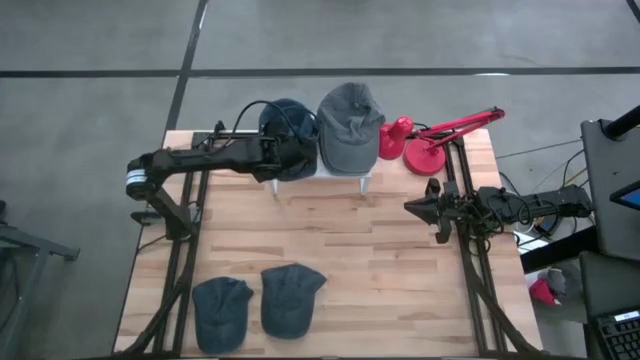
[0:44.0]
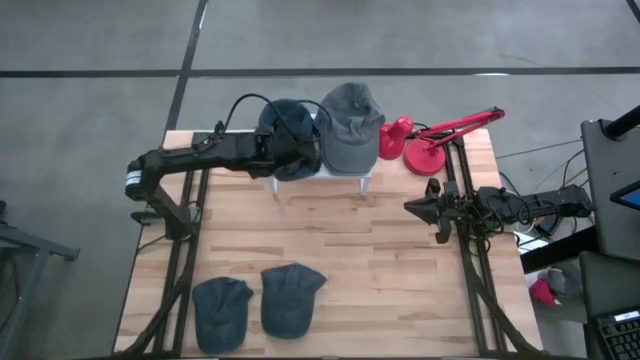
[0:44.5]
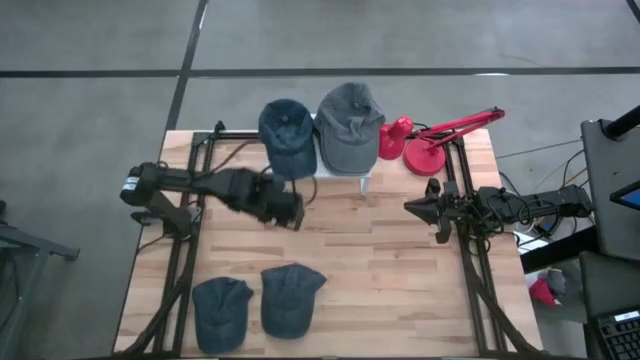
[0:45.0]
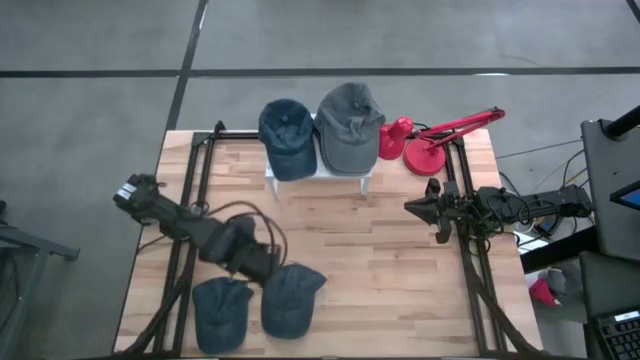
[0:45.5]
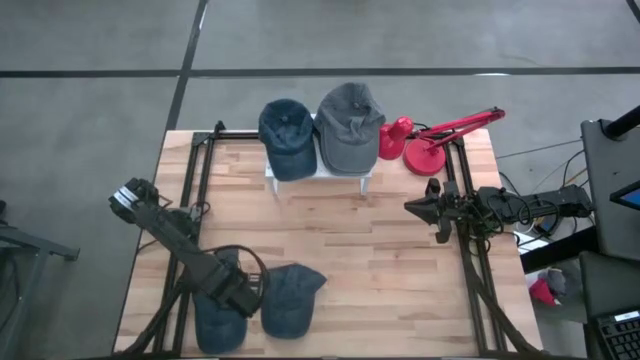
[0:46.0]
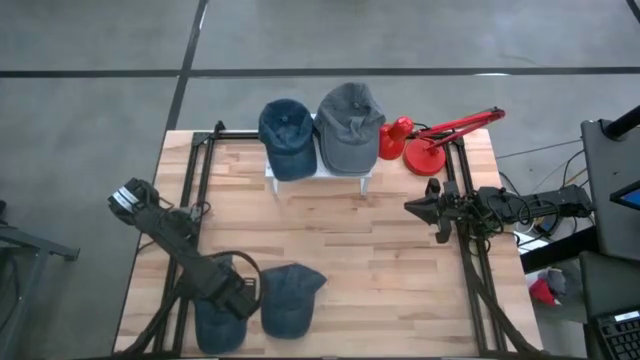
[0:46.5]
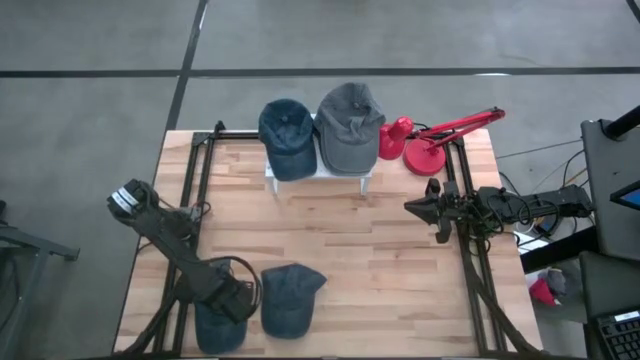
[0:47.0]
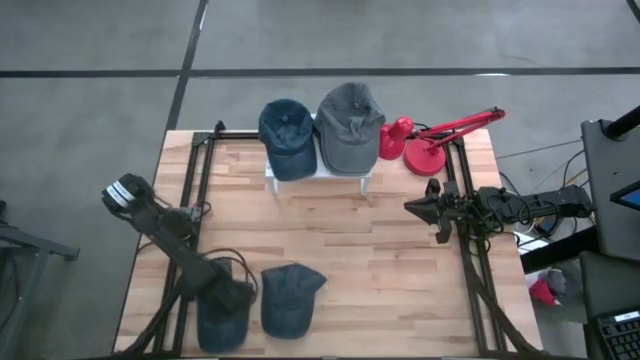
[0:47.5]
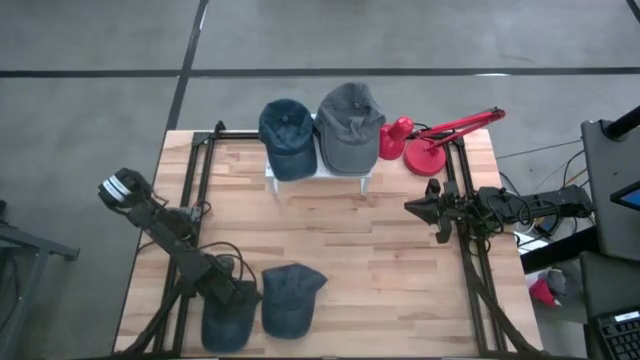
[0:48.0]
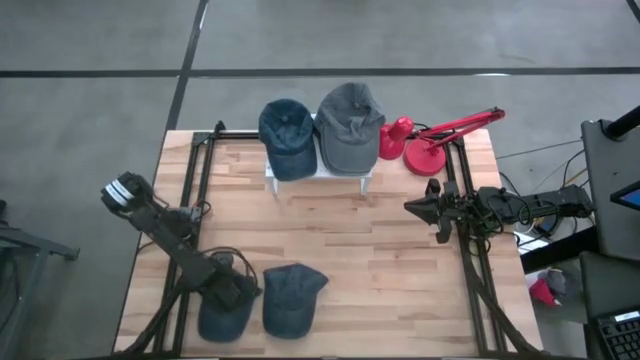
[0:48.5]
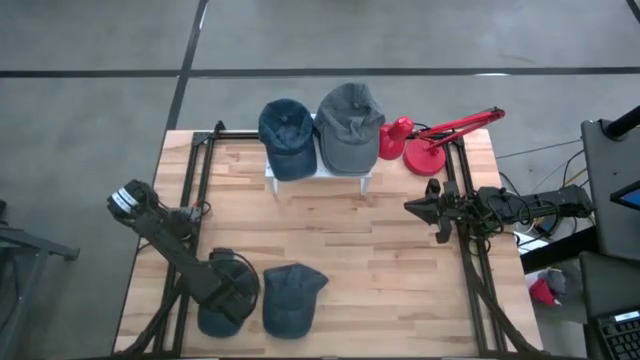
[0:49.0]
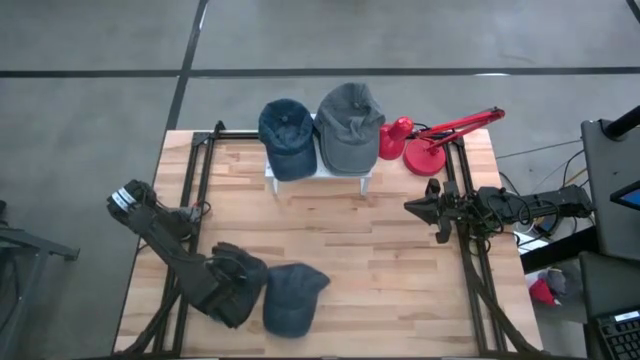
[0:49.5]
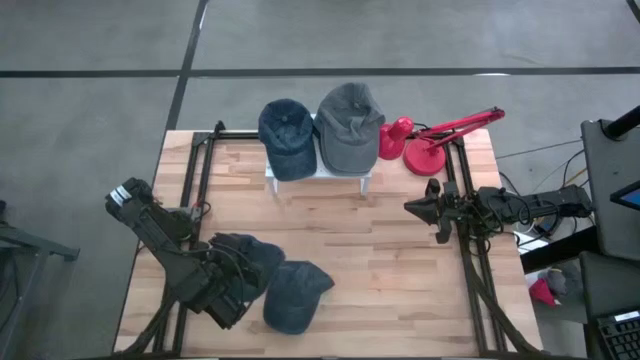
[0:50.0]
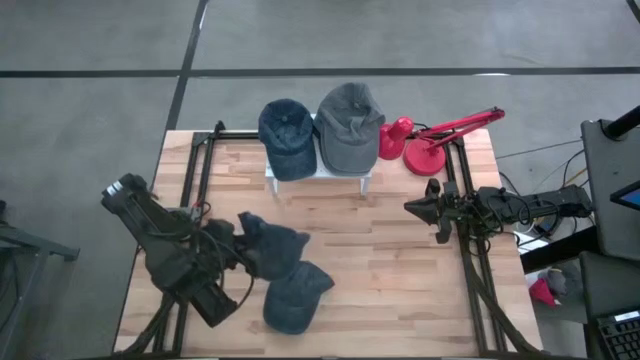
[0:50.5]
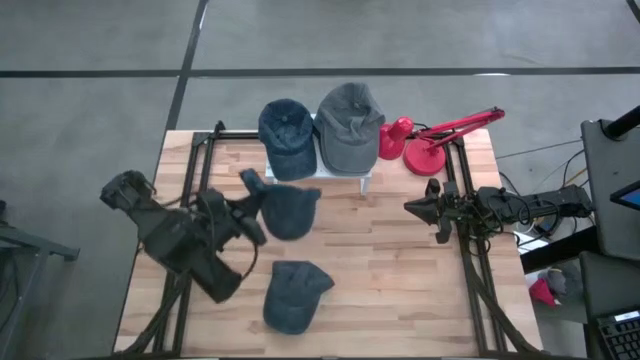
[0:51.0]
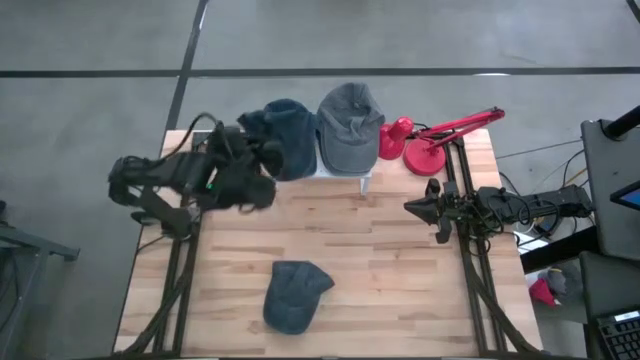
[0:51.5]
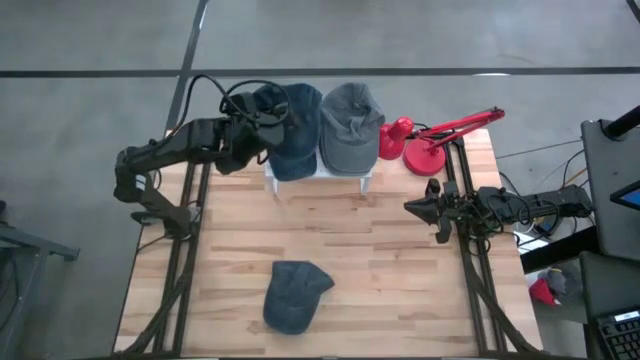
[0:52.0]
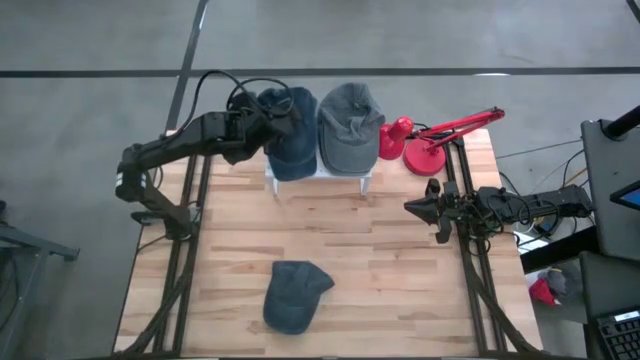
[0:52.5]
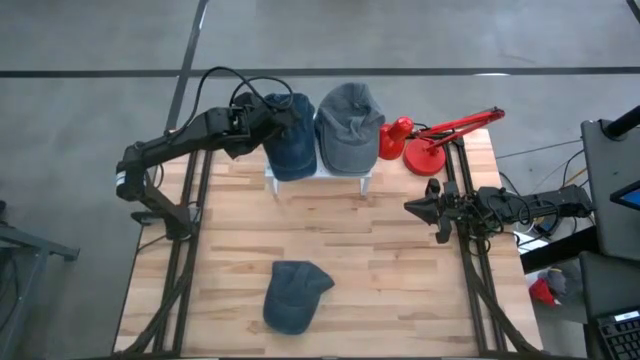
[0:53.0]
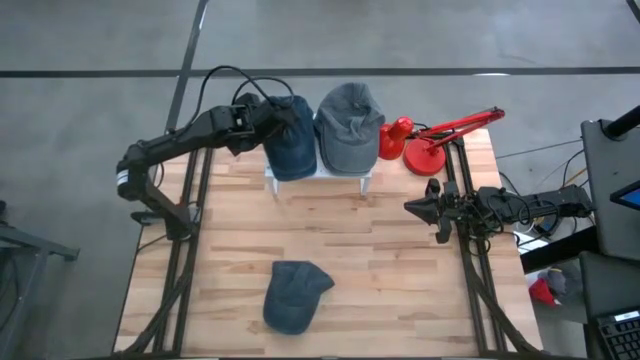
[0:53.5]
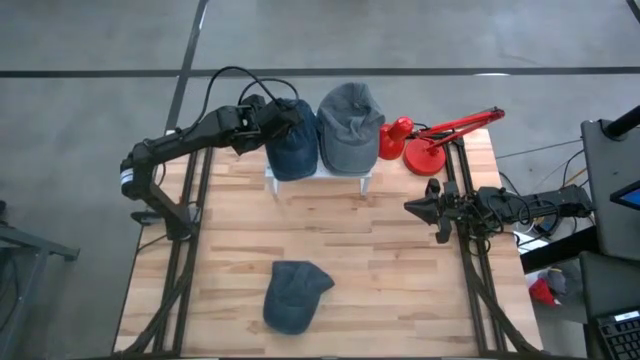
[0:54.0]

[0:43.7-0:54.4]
Task: Pick & Place hat
Stack the left blue cap on top of the blue cap on the shelf

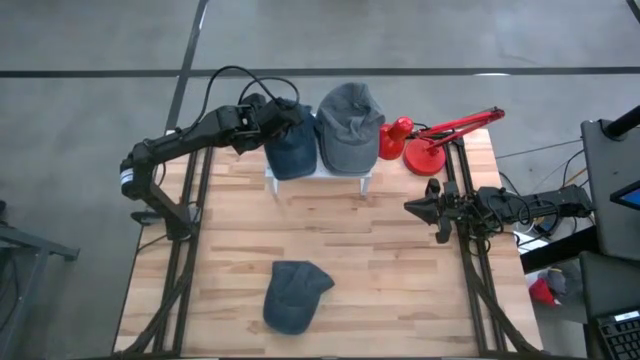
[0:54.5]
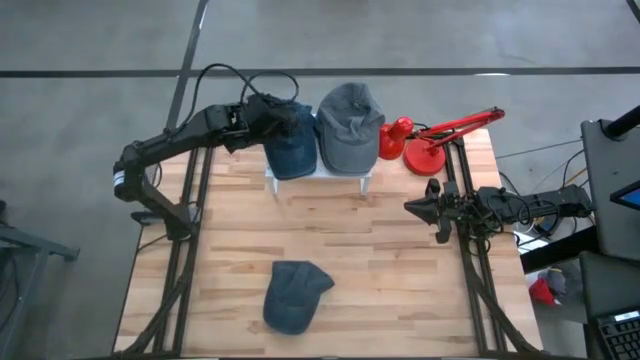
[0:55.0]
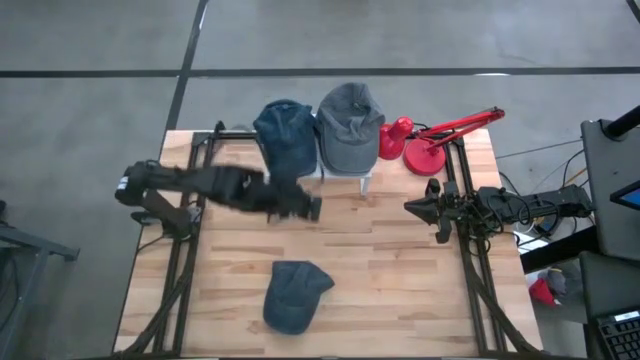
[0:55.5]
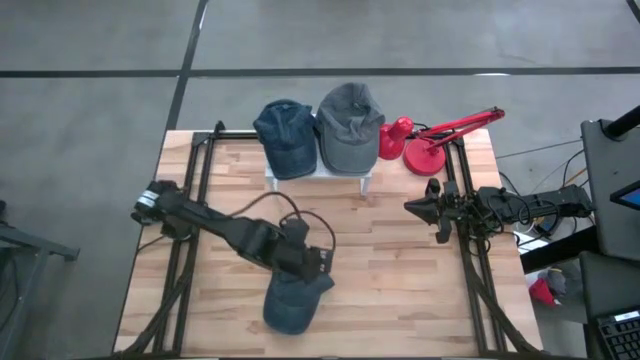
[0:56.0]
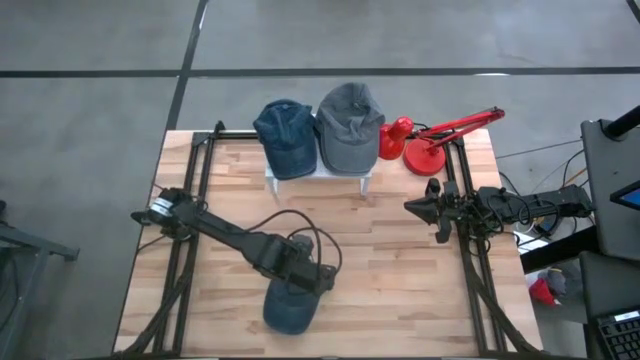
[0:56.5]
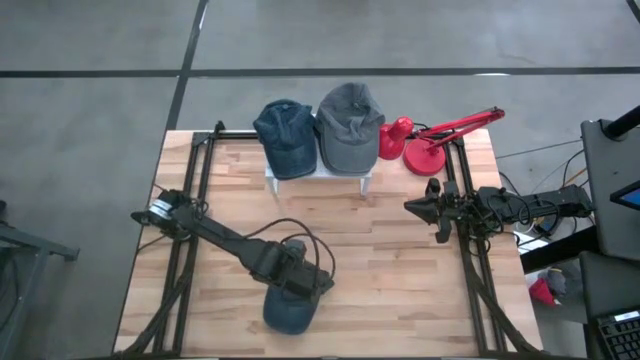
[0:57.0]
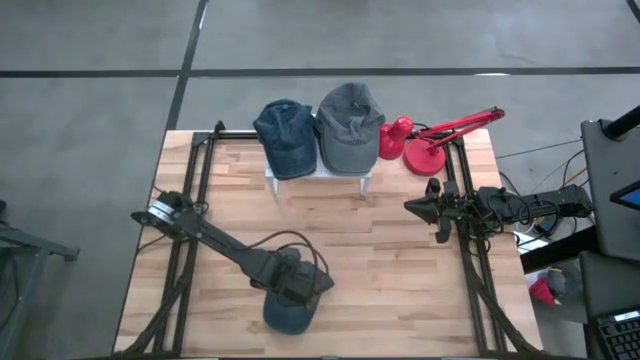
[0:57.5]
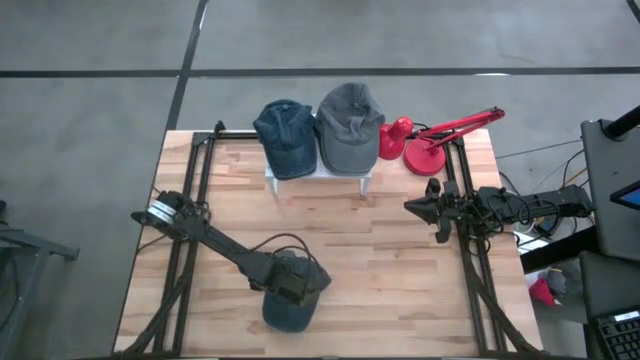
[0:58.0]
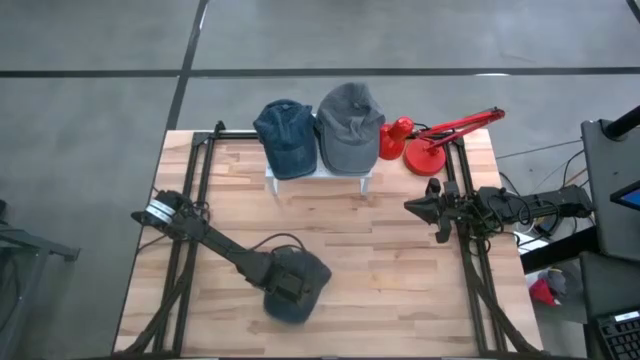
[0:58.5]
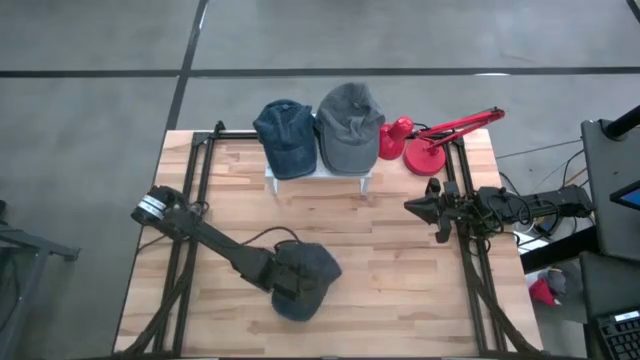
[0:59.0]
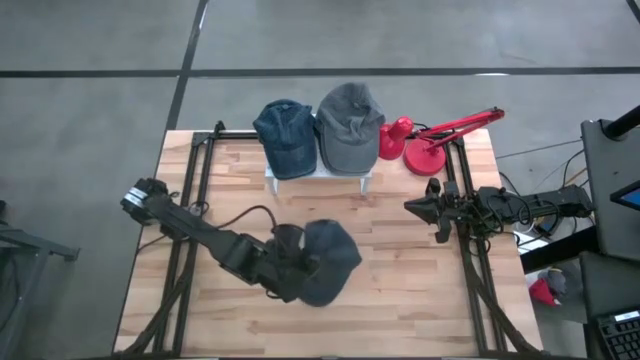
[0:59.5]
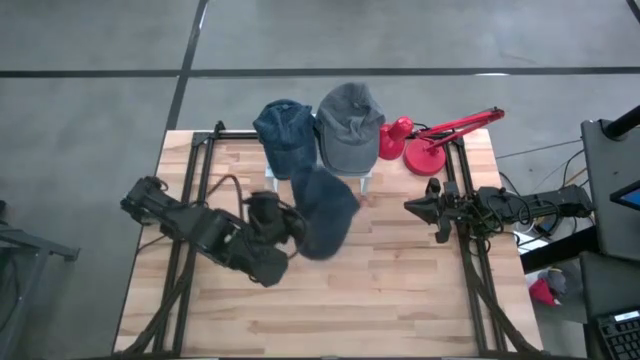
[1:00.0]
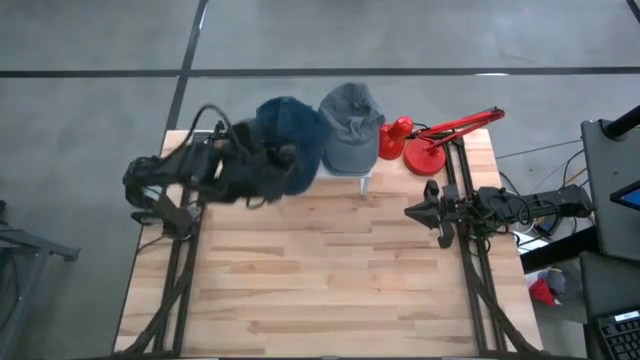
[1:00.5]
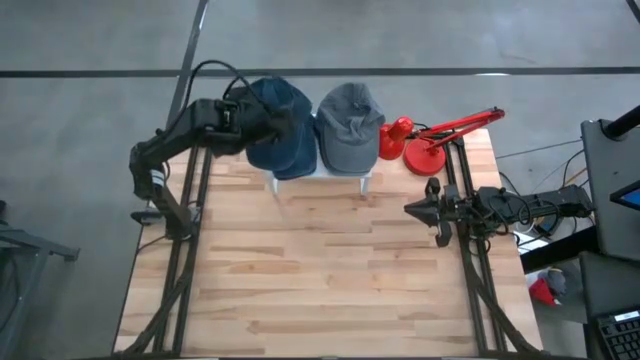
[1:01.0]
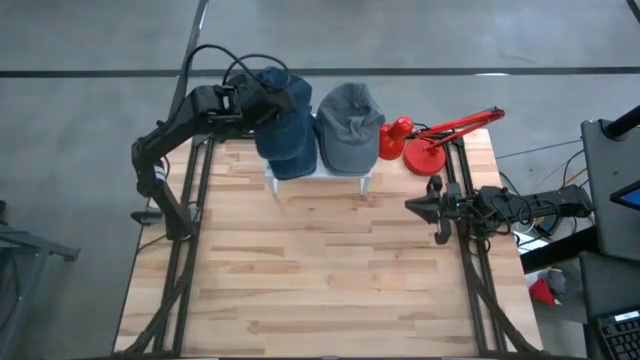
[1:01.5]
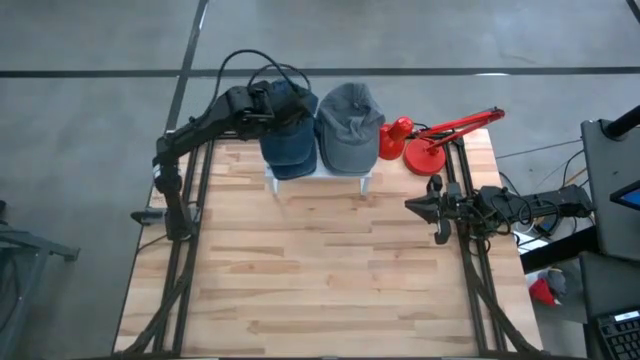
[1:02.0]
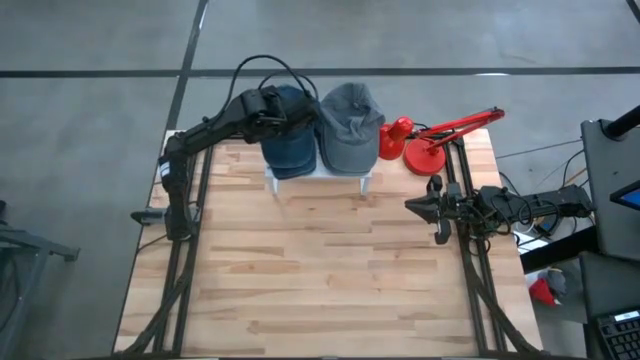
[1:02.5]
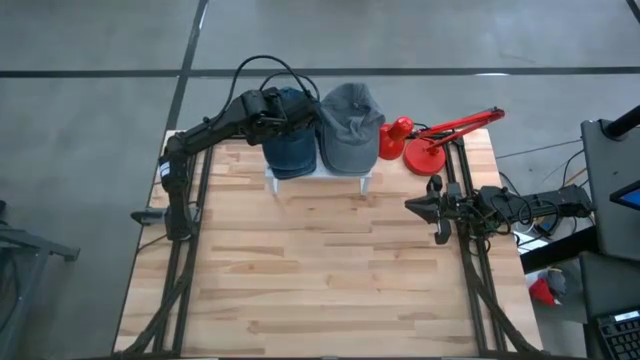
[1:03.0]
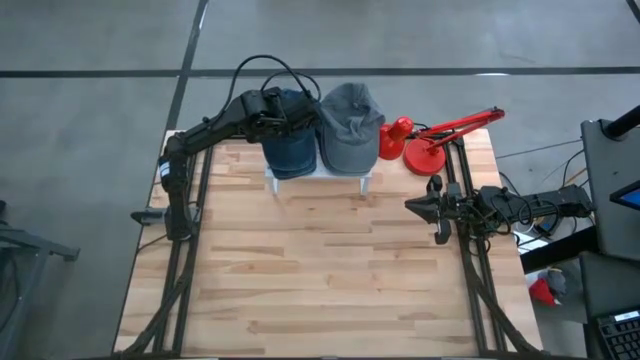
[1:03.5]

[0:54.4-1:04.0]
Stack the blue cap on top of the blue caps on the shelf

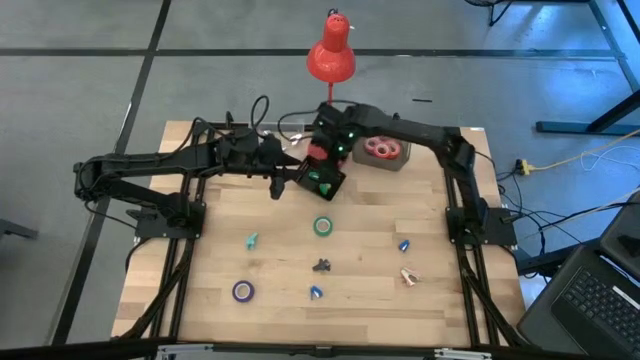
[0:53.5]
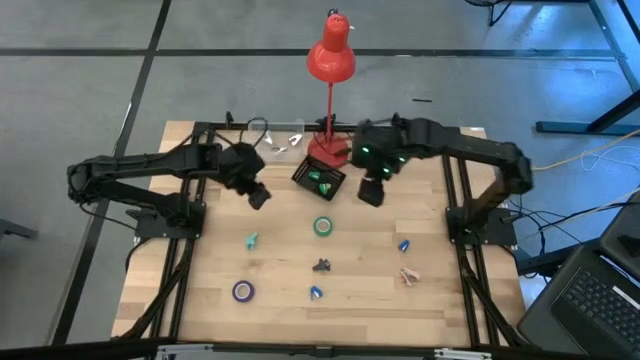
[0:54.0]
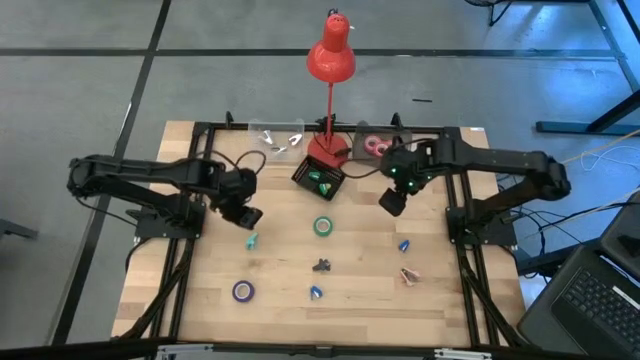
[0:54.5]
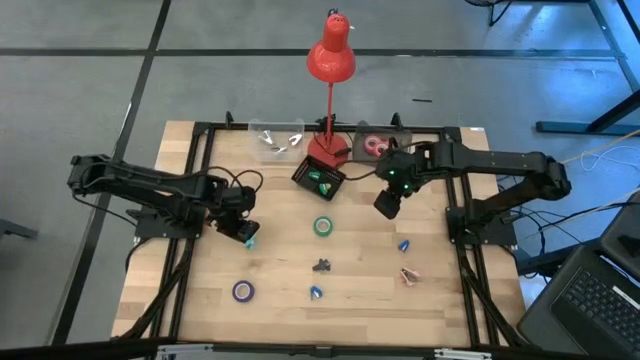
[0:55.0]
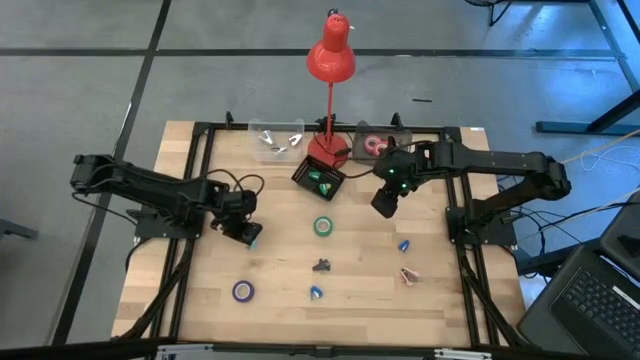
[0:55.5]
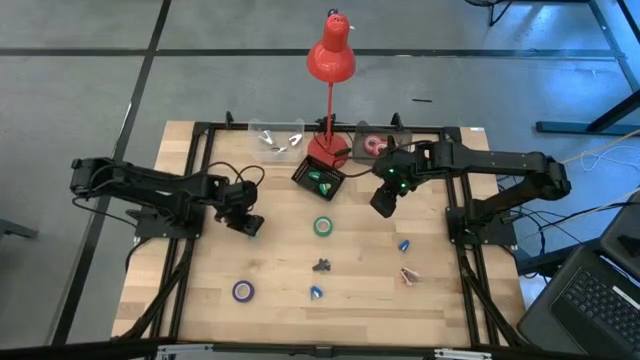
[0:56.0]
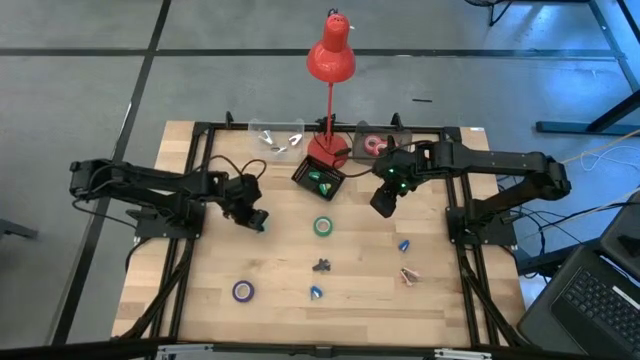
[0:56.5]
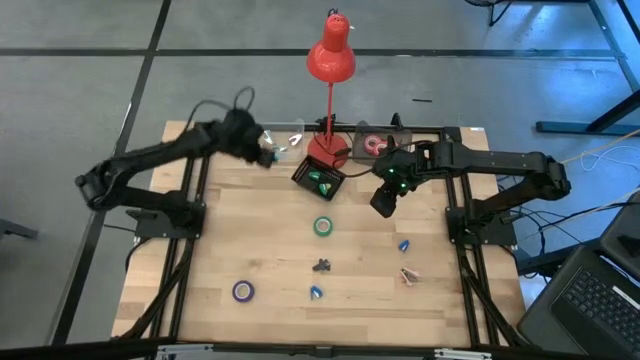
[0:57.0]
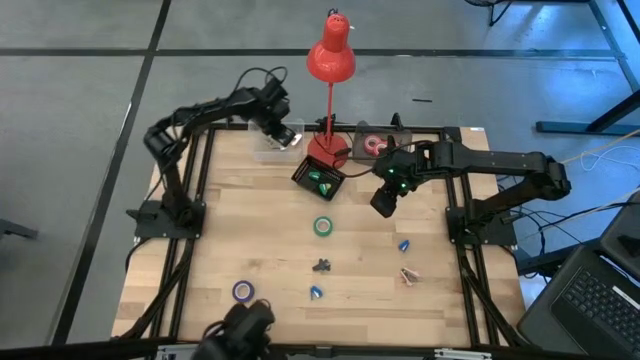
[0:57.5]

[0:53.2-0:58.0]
Task: Pick and place Stapler, Stapler remover, tape
Put the light blue staple remover into the transparent bin
